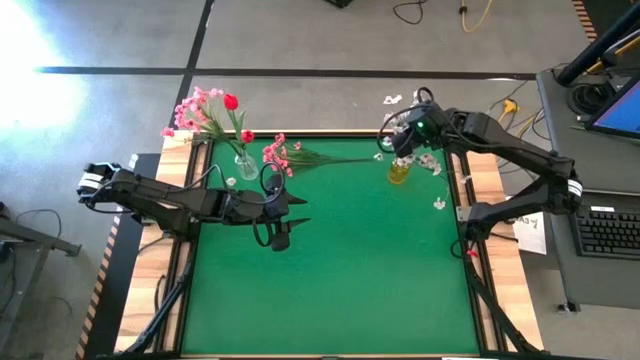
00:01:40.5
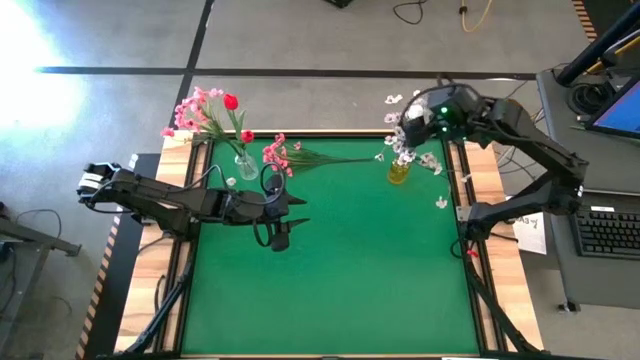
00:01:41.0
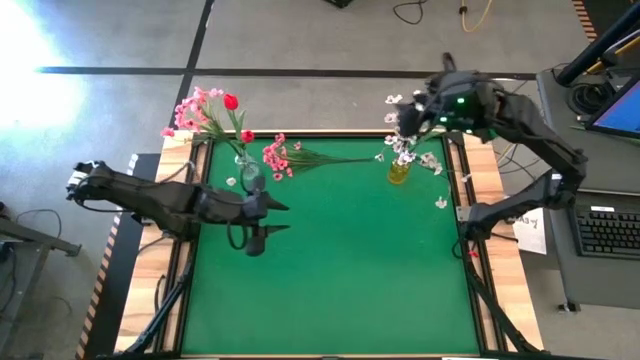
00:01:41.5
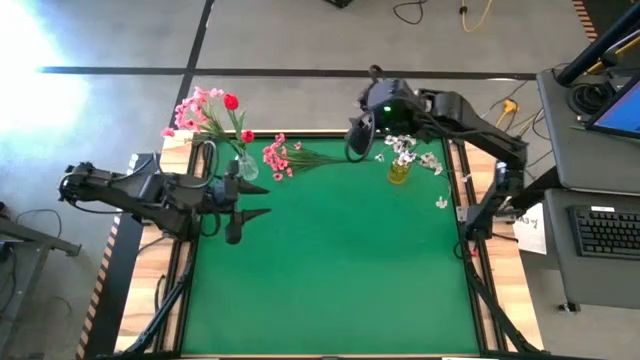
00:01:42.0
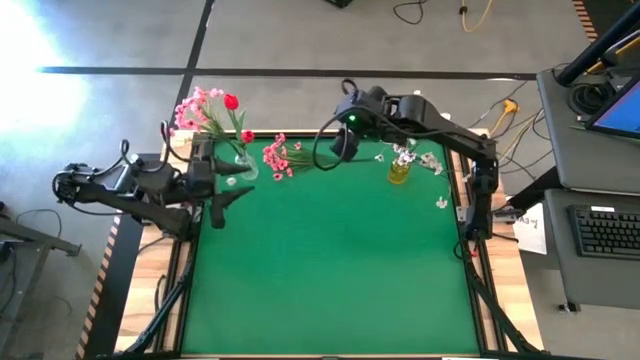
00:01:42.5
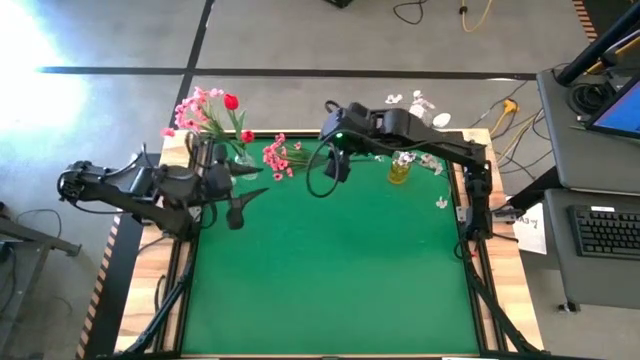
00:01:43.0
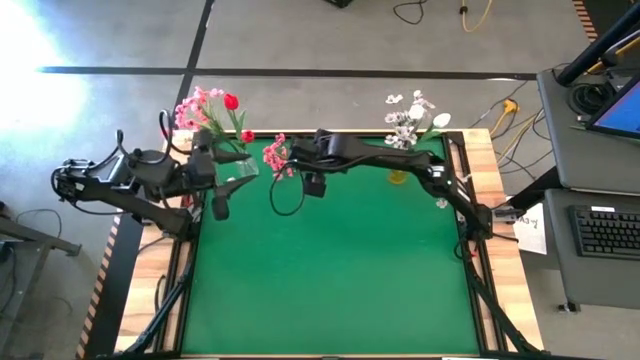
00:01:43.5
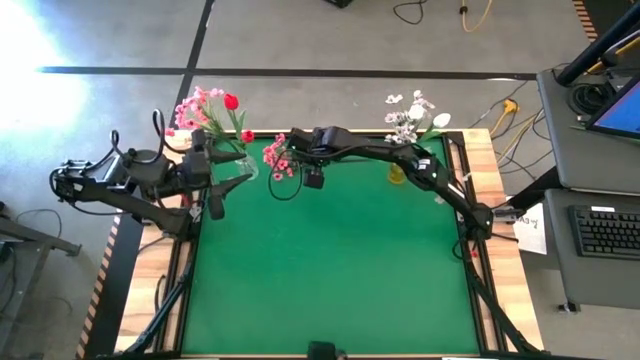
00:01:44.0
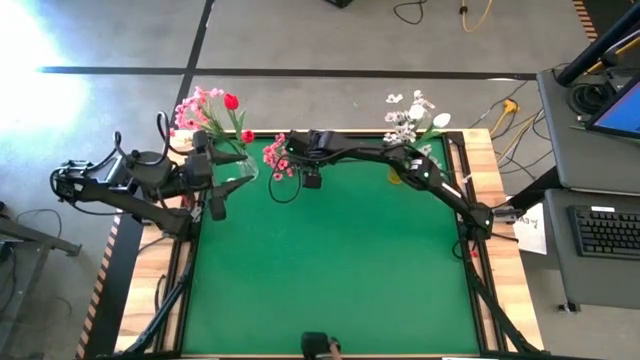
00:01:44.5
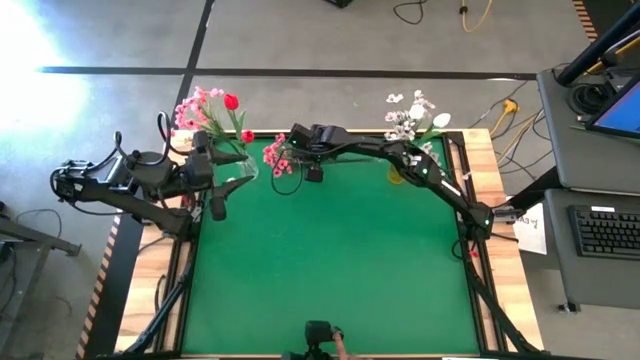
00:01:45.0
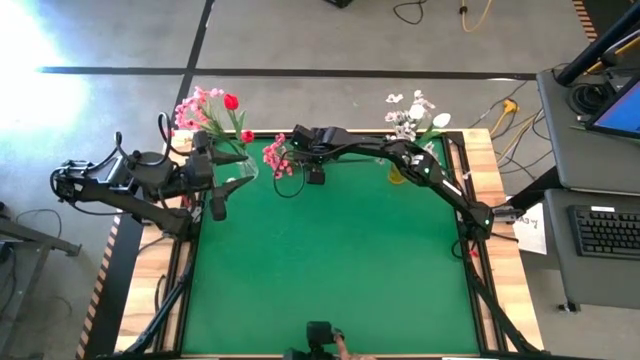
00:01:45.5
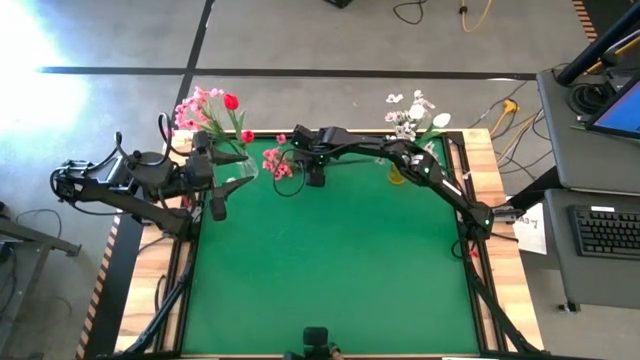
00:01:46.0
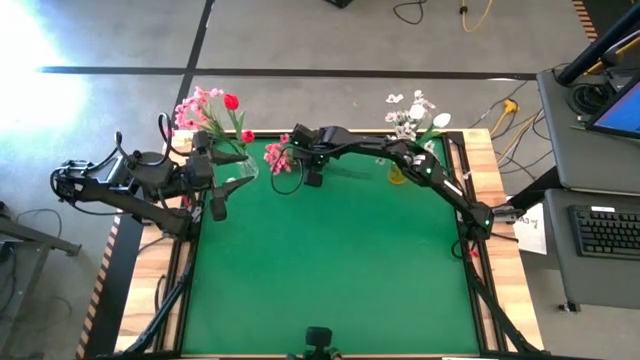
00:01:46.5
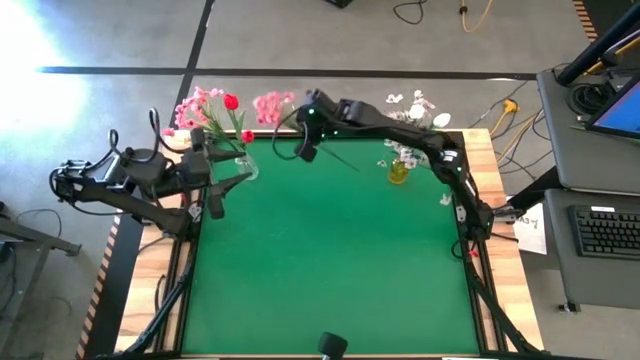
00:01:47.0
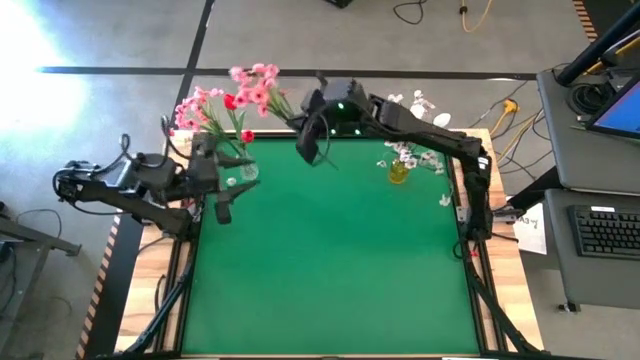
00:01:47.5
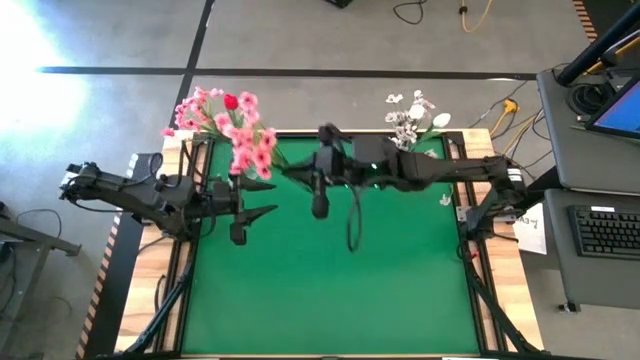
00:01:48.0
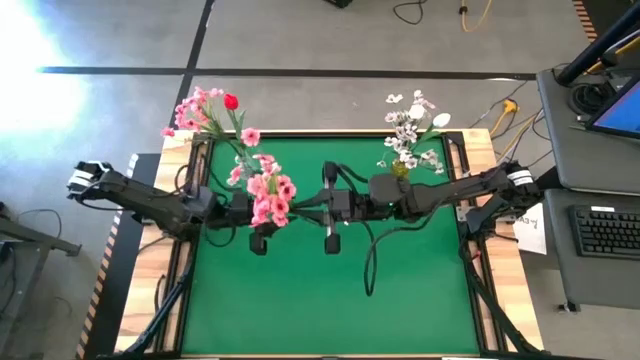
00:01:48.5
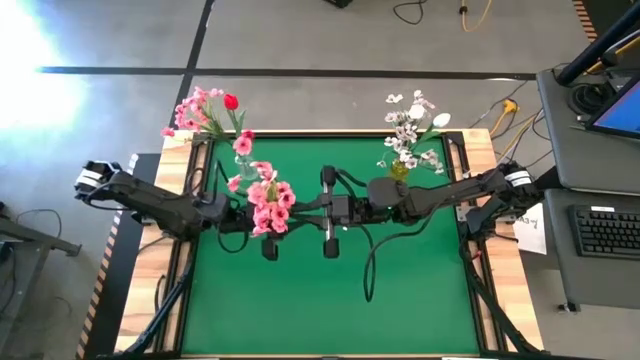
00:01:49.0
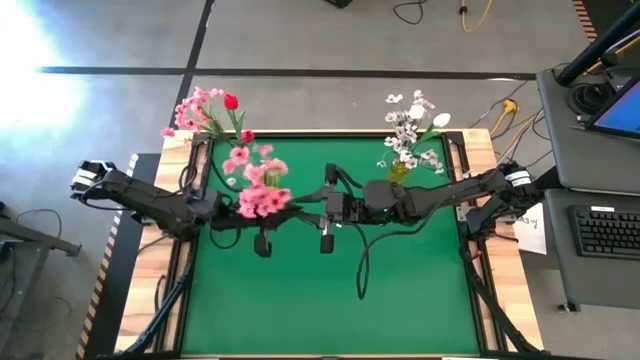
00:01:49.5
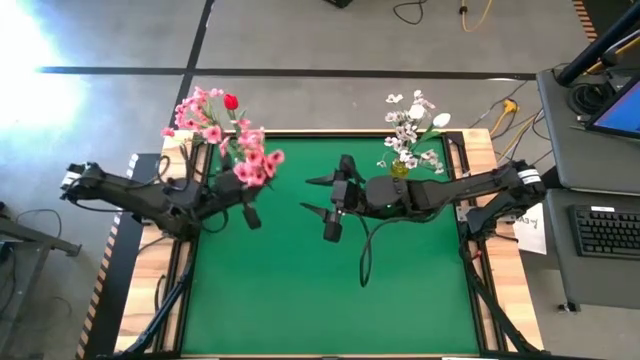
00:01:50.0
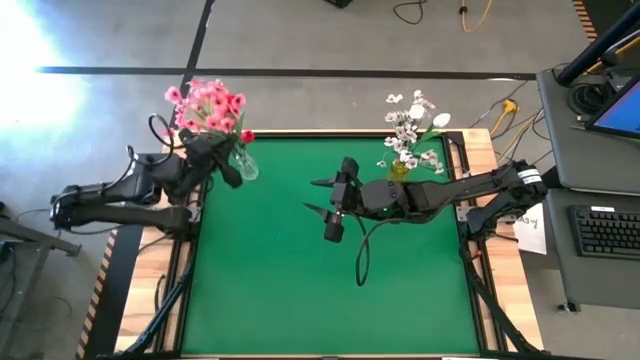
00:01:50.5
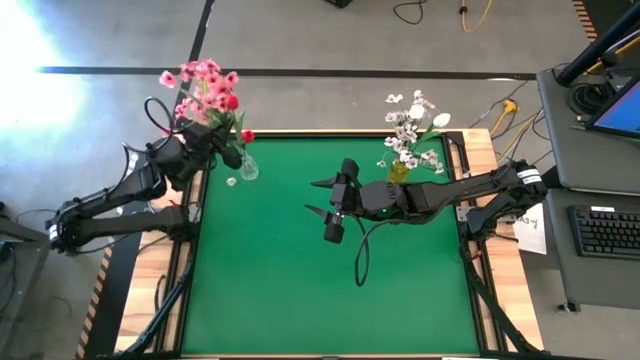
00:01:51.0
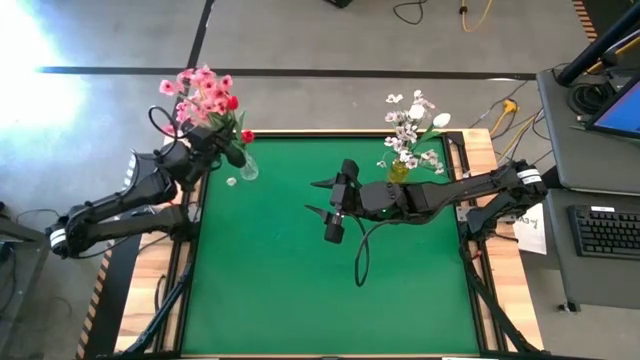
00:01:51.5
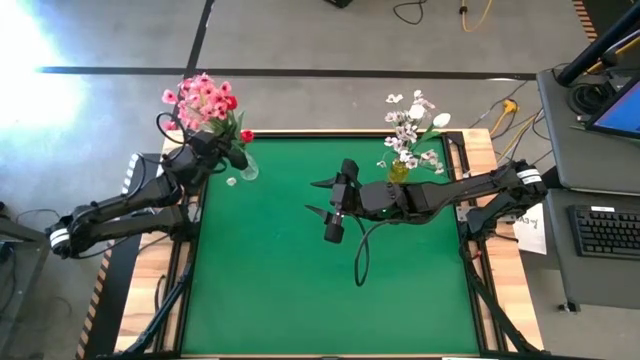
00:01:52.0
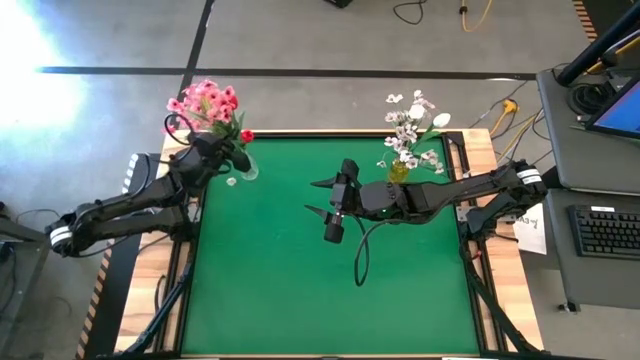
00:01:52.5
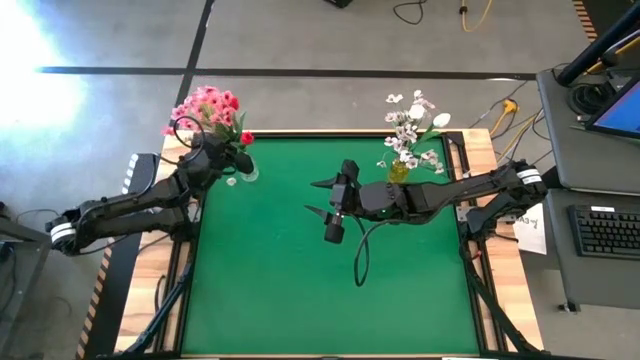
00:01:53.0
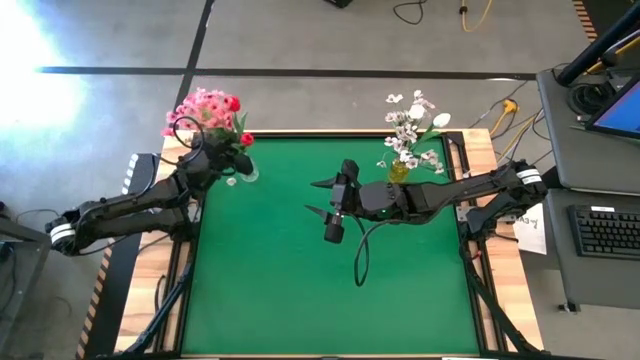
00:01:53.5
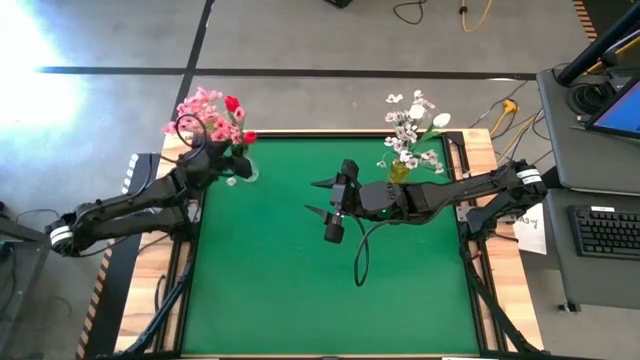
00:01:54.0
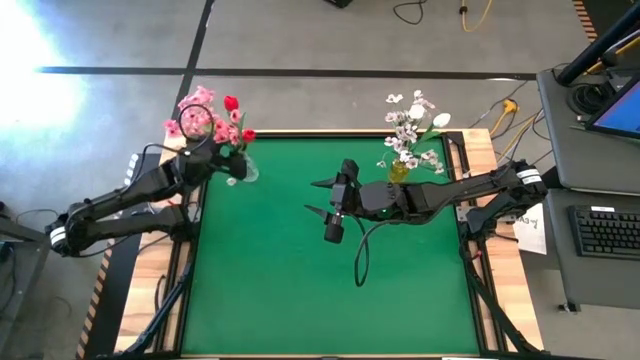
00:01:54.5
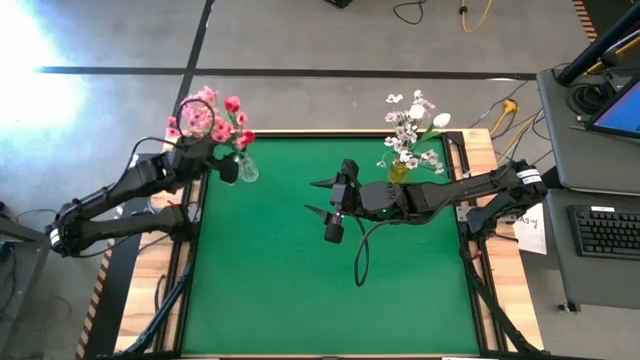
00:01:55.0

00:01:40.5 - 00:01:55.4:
Task: Sort flowers into vase by color
Put the pink flowers into the transparent vase

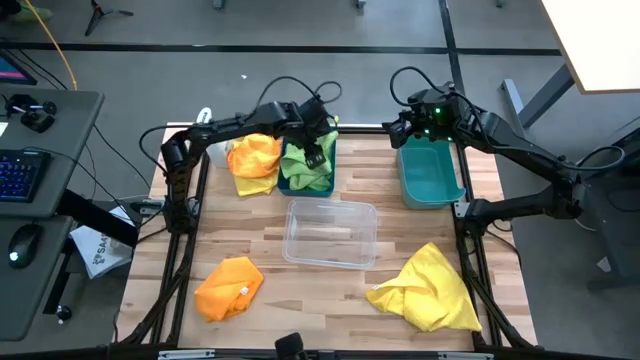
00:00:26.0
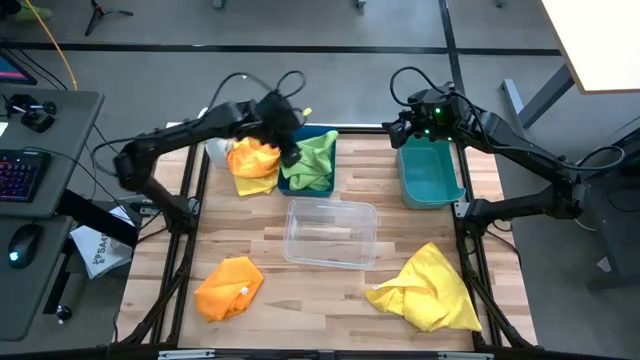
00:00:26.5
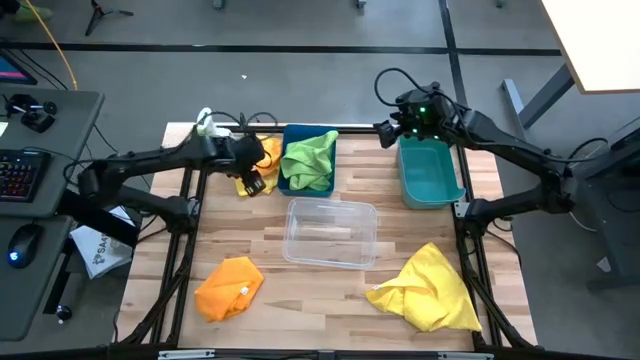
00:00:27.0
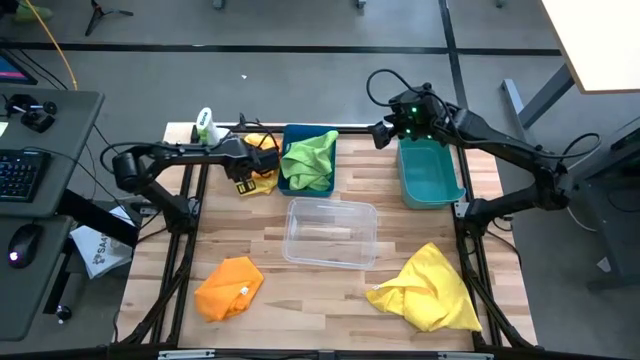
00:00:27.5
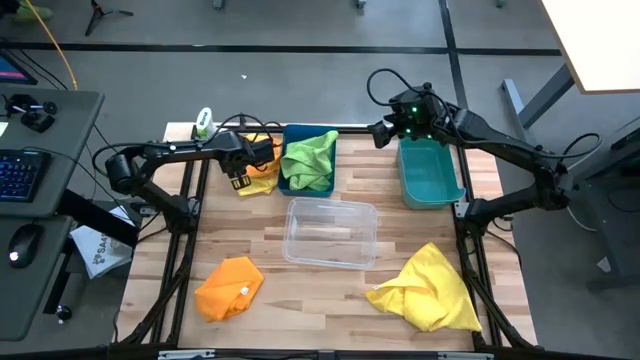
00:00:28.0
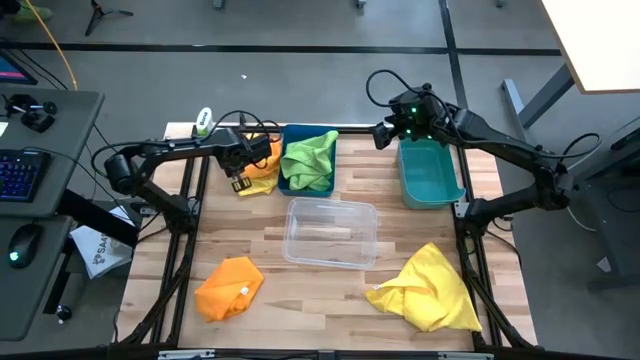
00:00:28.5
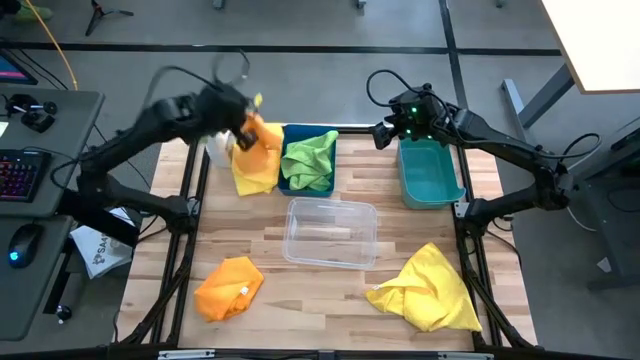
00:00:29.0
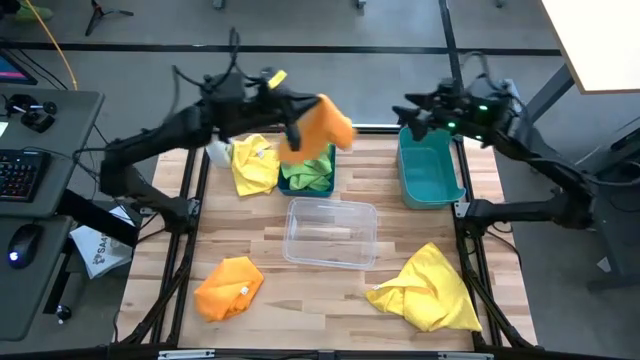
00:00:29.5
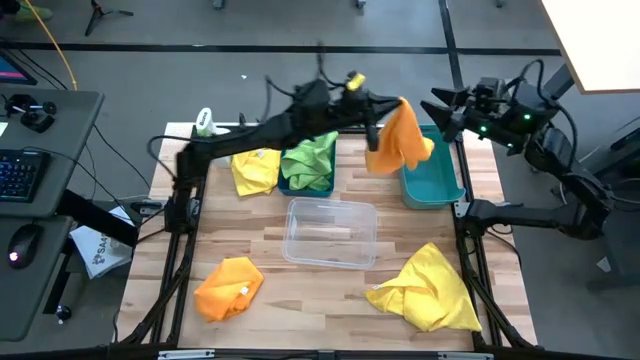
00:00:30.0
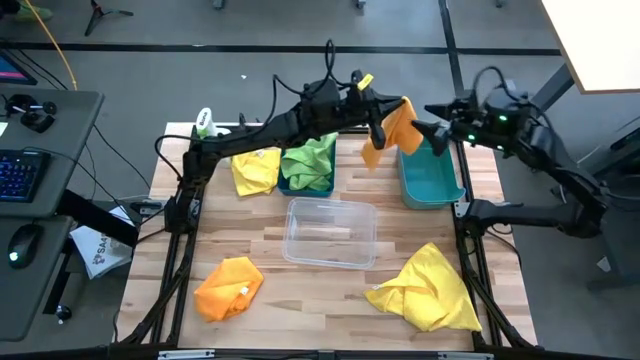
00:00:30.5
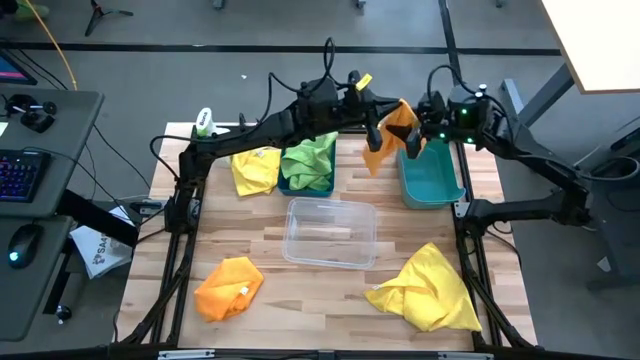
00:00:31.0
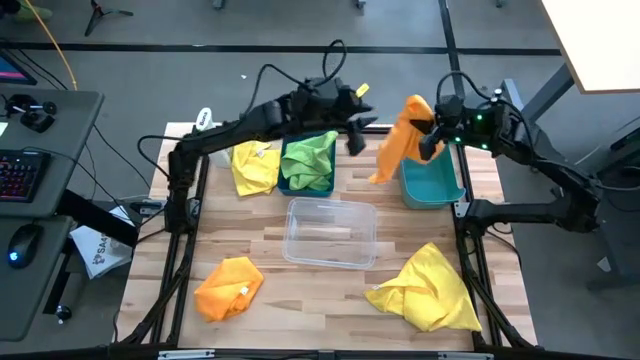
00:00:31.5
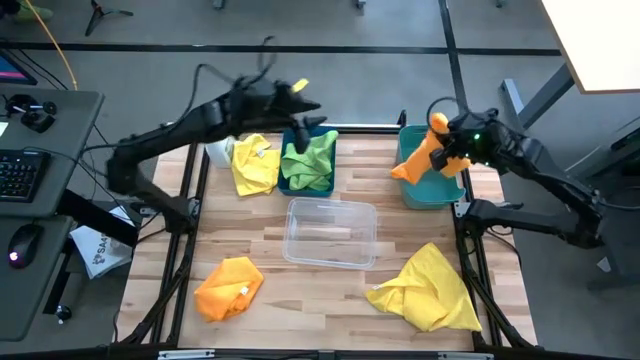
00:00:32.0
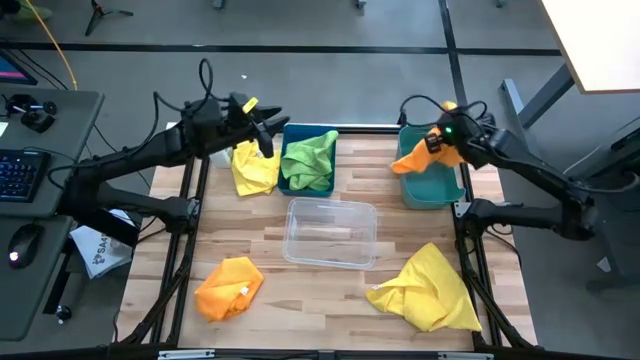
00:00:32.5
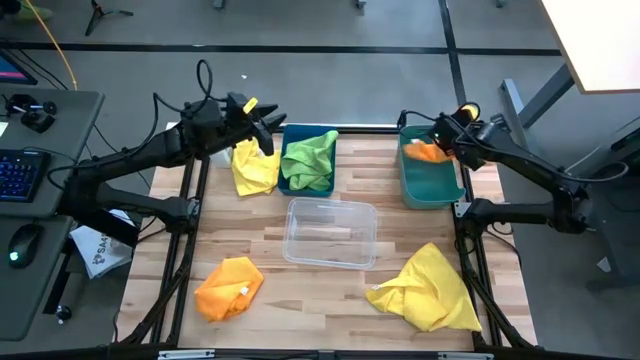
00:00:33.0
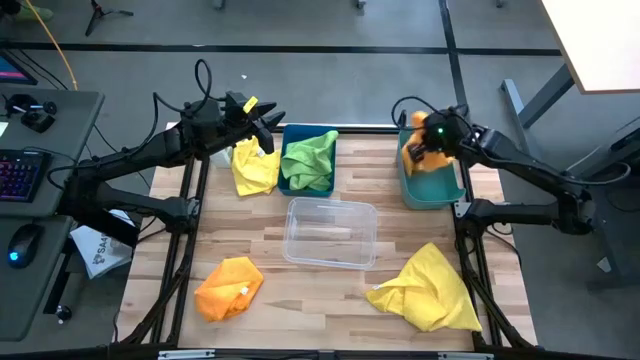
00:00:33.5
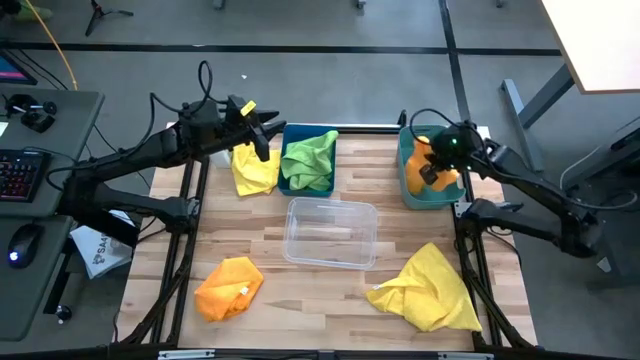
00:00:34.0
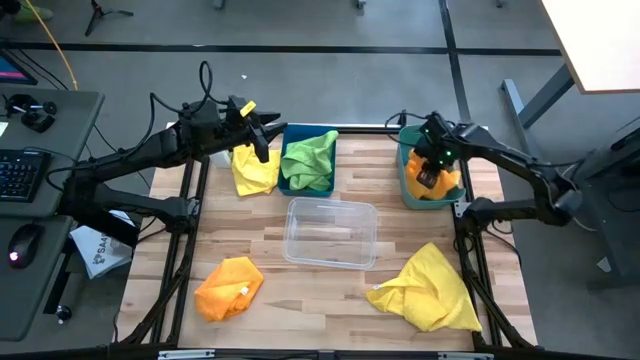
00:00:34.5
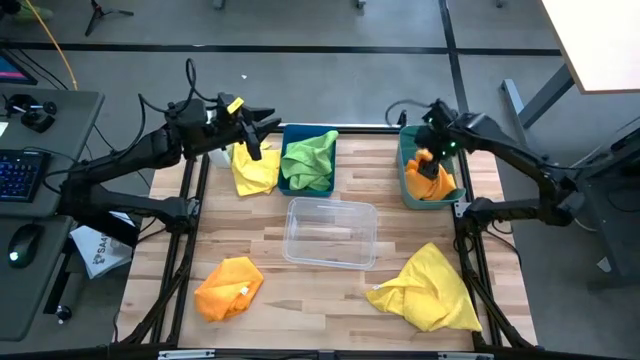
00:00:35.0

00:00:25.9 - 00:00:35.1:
Task: Sort microfiber towel by color & place in baskets
Put the top orange microfiber cloth into the green bin
